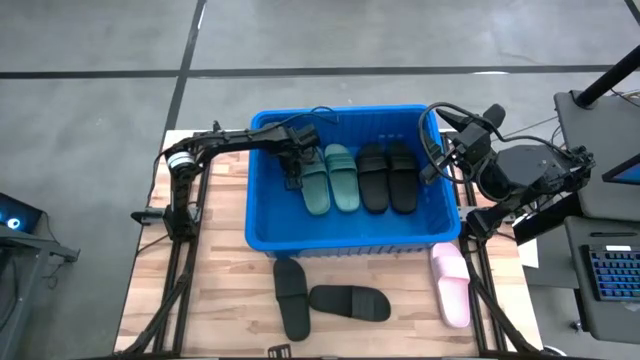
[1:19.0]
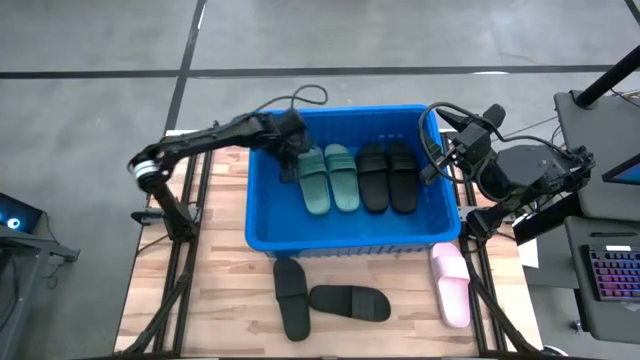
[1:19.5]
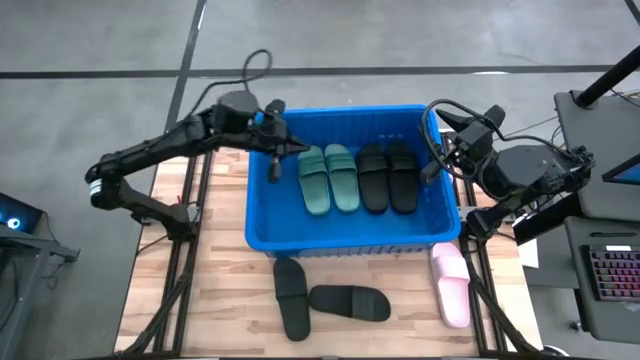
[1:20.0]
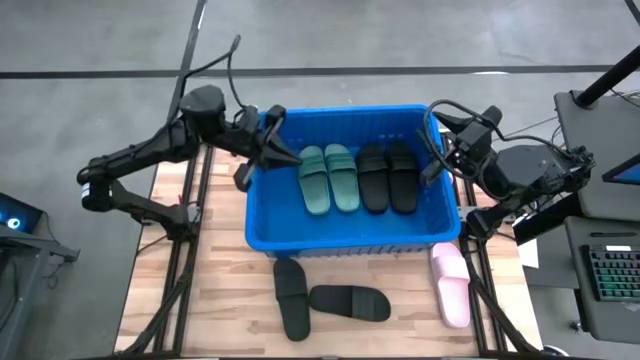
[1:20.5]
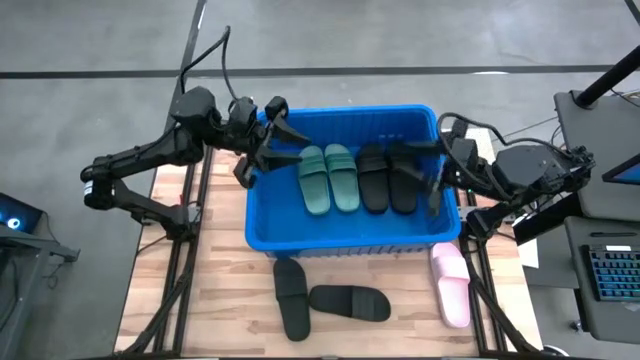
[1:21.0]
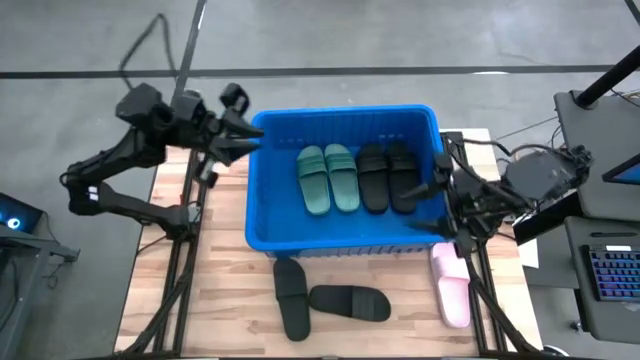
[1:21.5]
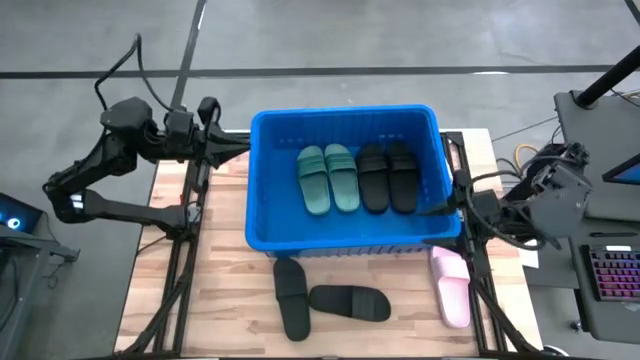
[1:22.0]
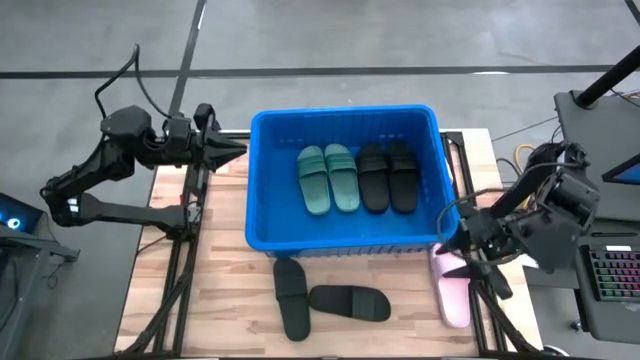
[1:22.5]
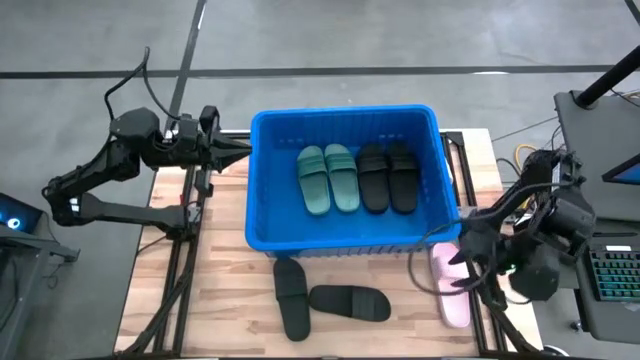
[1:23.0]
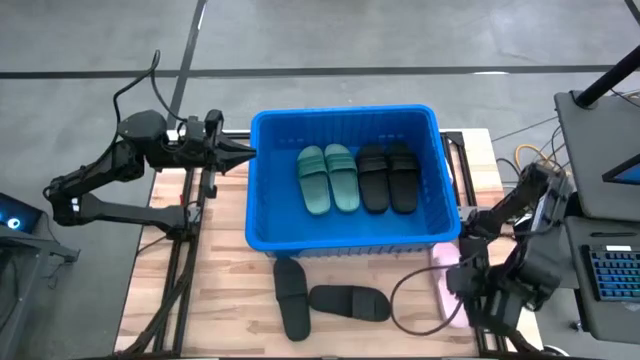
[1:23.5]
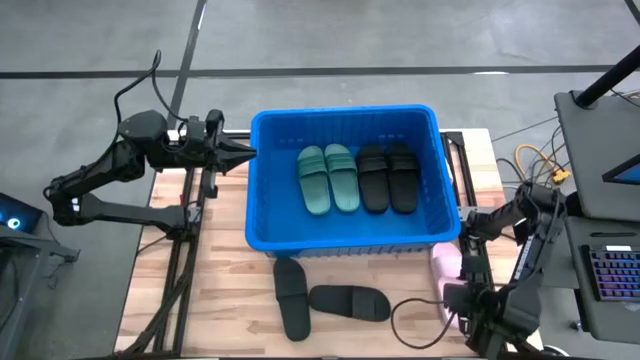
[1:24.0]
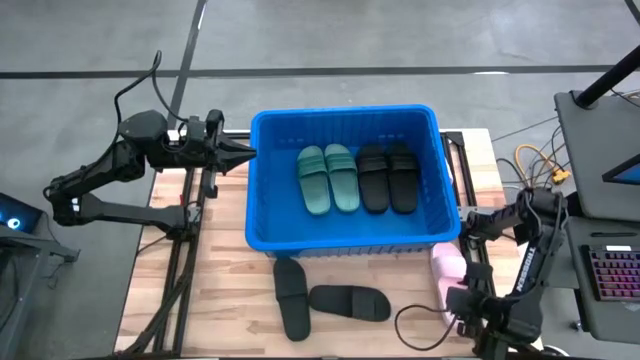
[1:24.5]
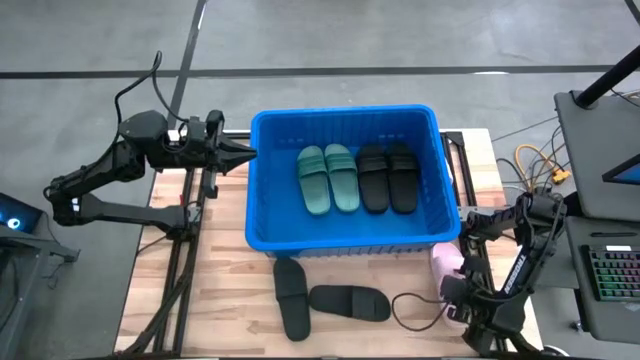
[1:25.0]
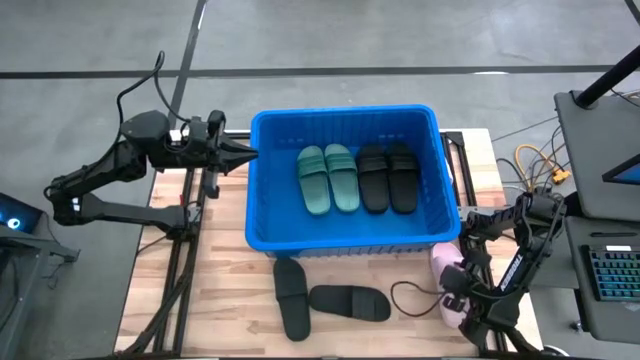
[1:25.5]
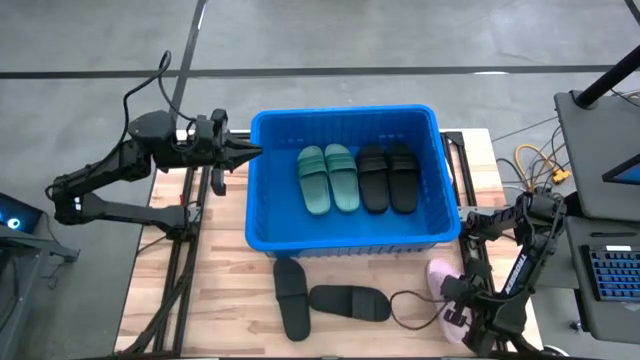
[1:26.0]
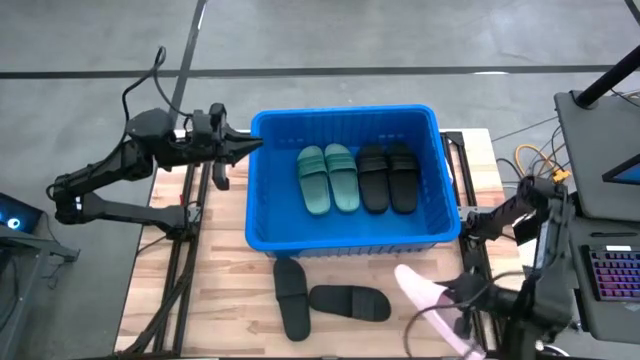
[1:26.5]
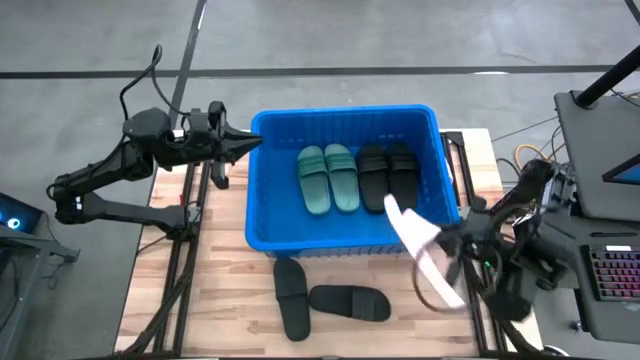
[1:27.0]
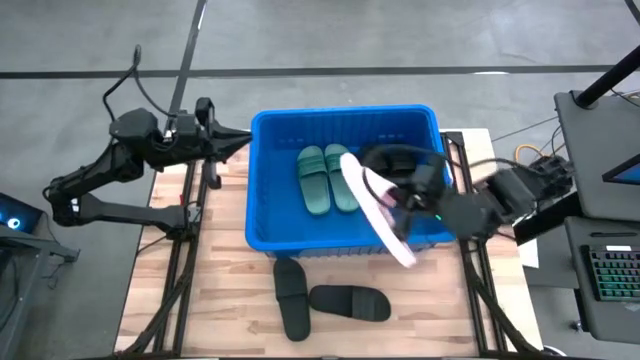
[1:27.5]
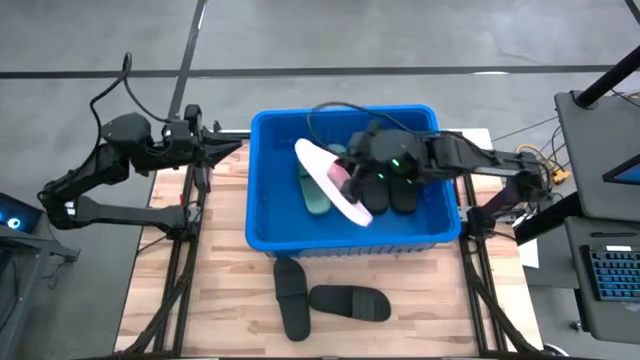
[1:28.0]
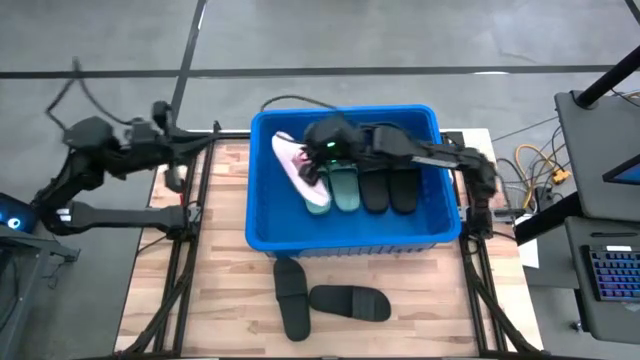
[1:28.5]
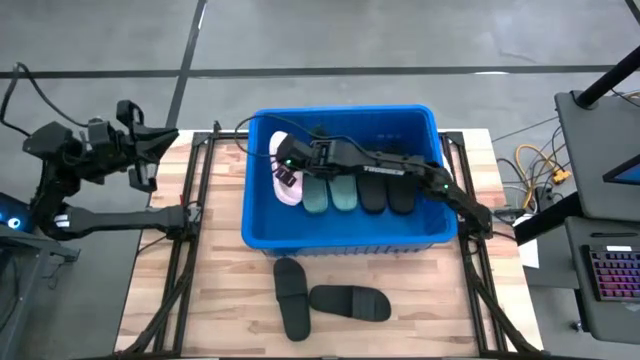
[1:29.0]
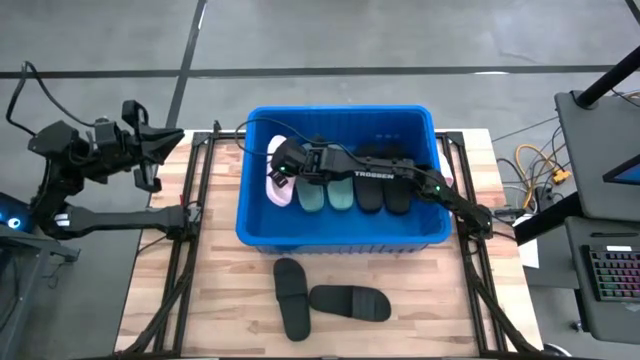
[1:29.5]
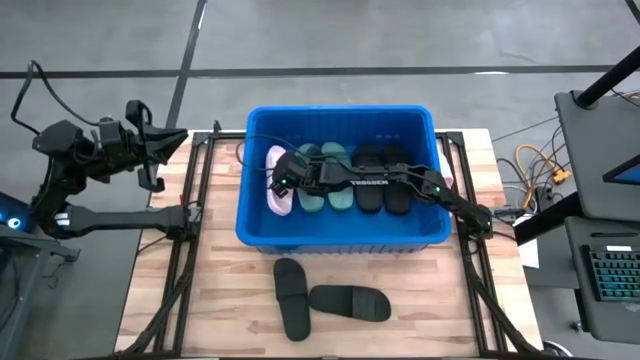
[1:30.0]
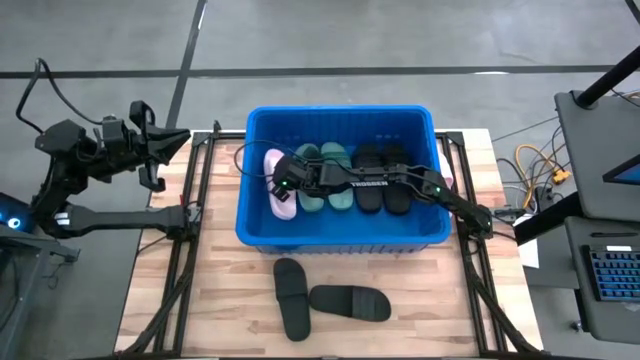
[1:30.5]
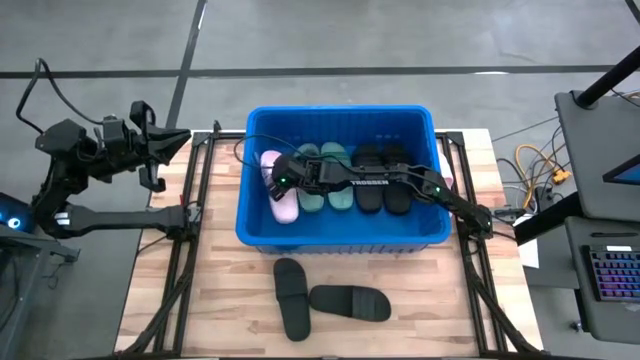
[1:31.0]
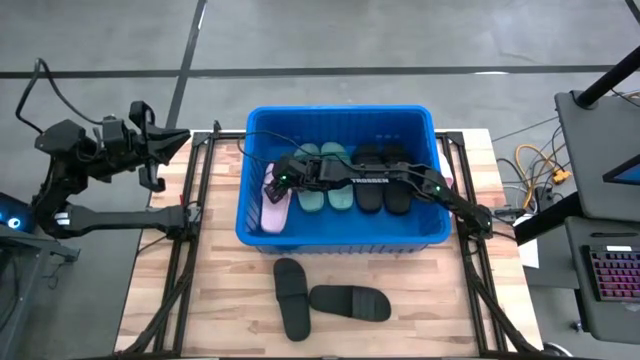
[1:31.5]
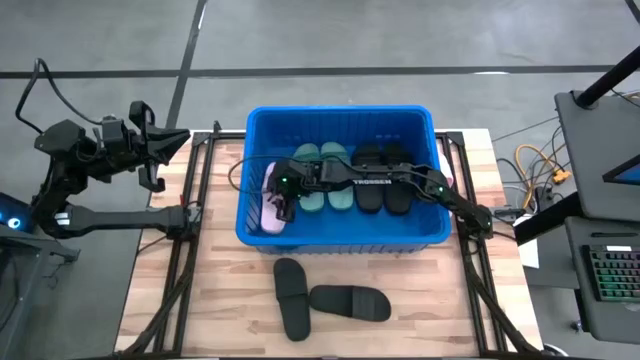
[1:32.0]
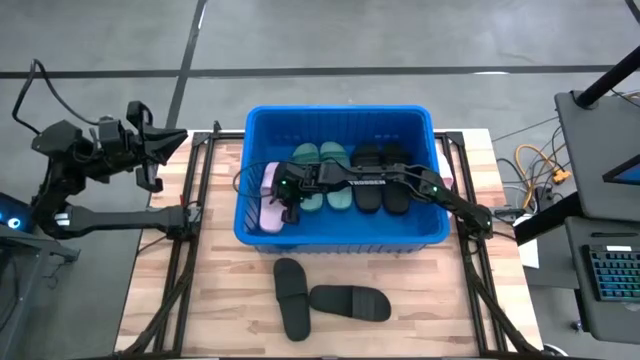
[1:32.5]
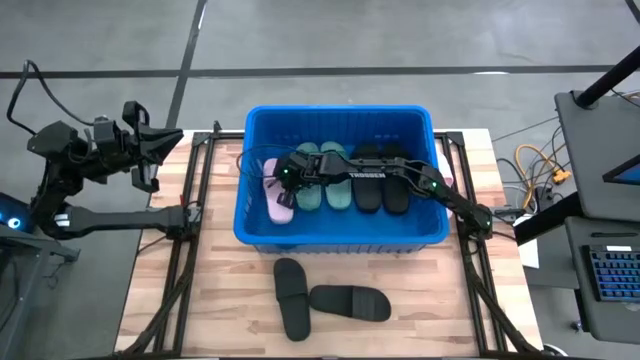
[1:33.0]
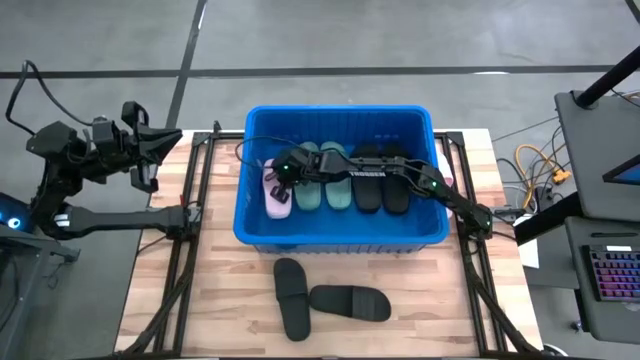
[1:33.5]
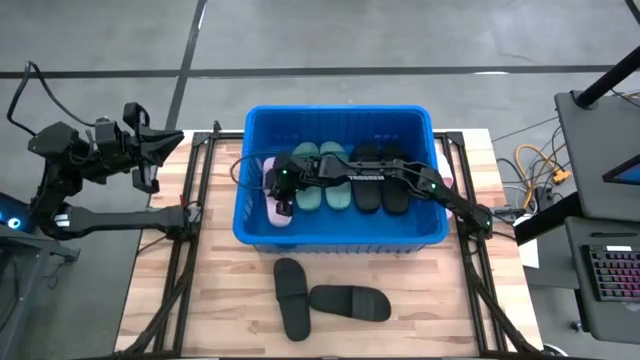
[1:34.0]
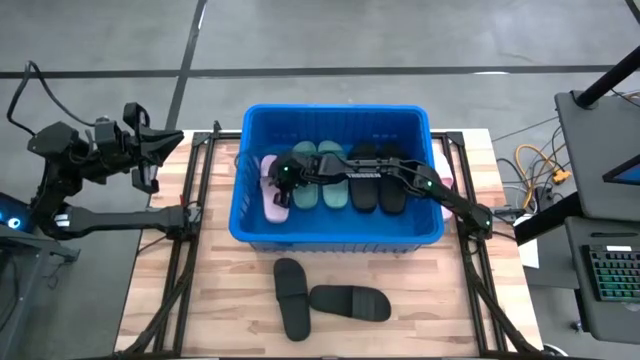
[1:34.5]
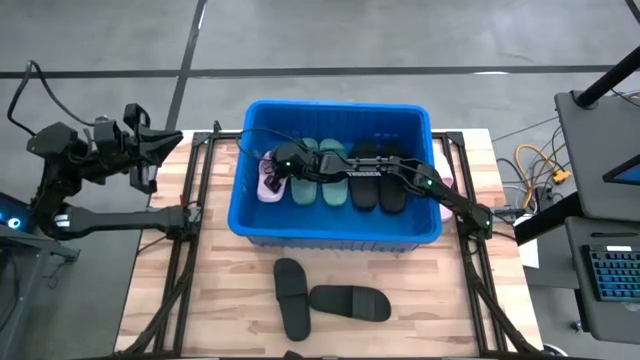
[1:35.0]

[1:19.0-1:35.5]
Task: Pick and place slides into bin
Put the bottom pink slide into the blue container

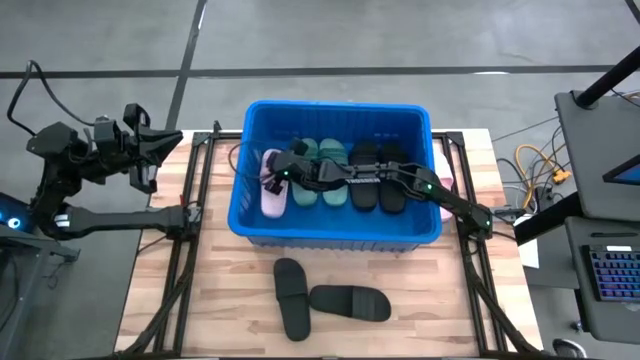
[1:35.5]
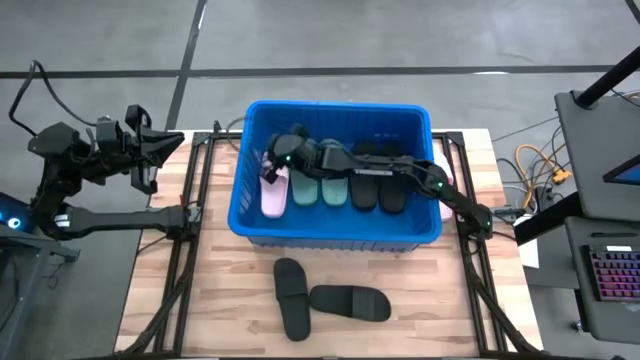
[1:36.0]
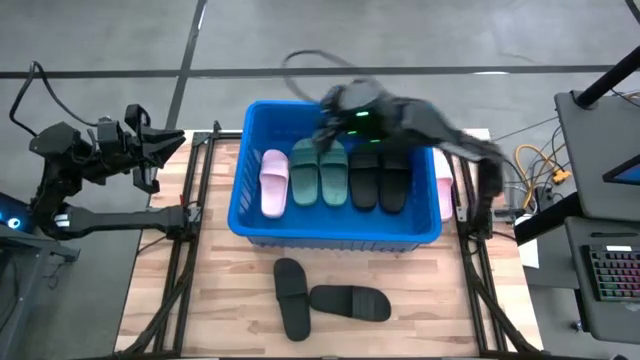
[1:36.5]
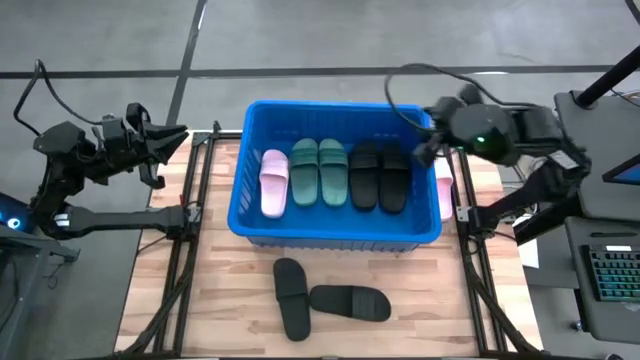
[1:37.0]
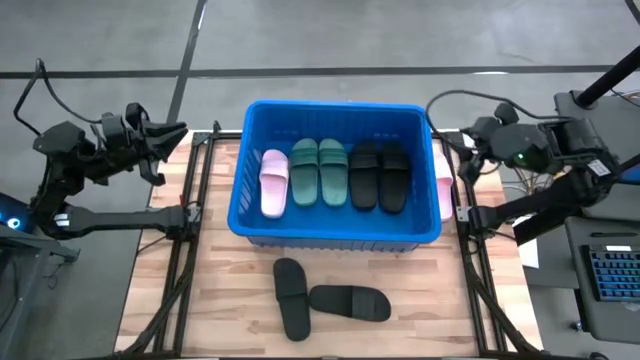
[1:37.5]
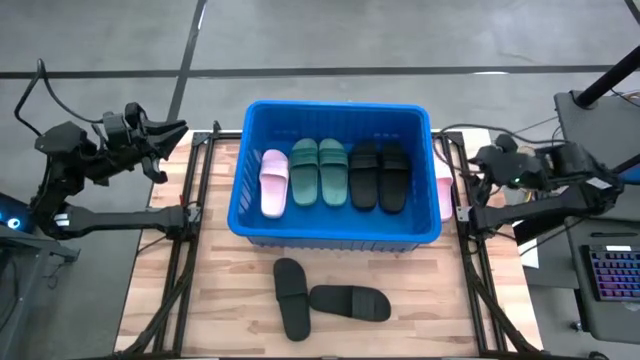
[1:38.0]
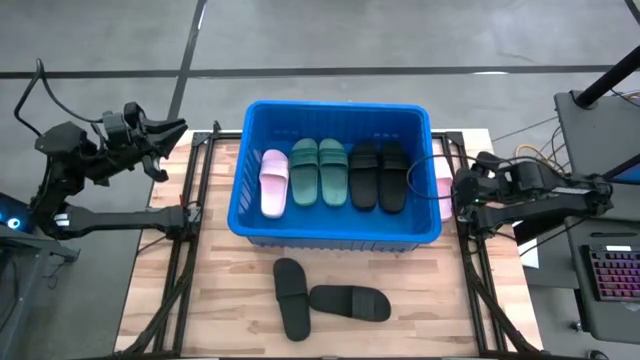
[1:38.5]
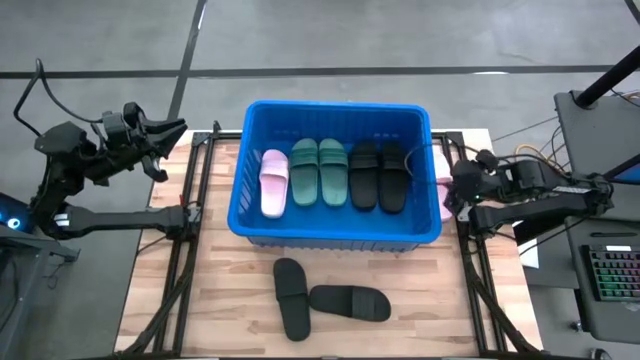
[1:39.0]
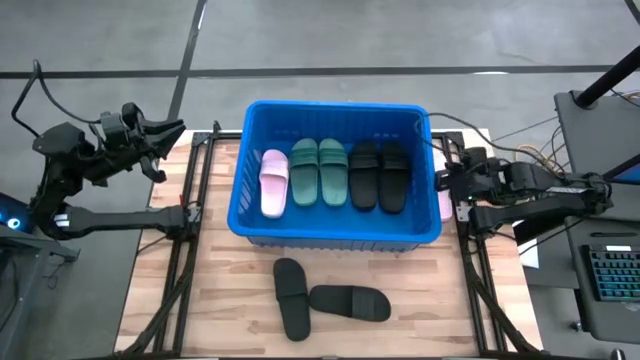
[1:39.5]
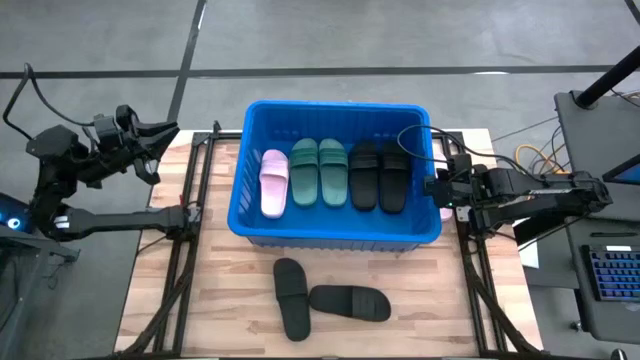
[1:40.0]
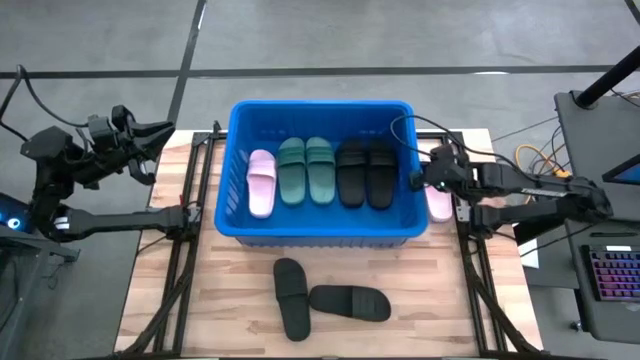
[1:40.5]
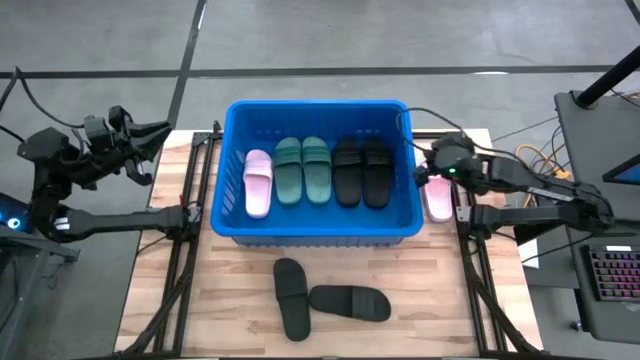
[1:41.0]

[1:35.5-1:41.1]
Adjust the blue container on the table
